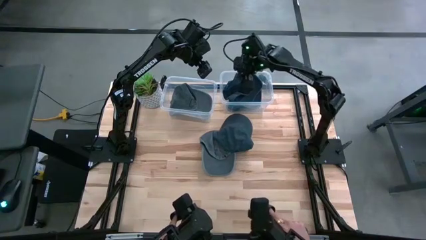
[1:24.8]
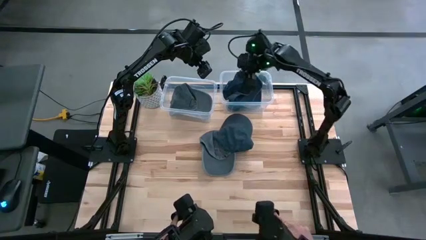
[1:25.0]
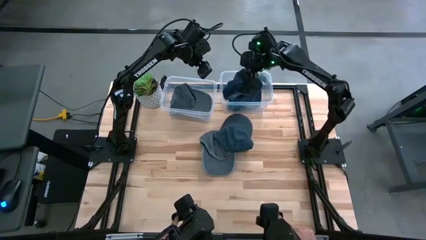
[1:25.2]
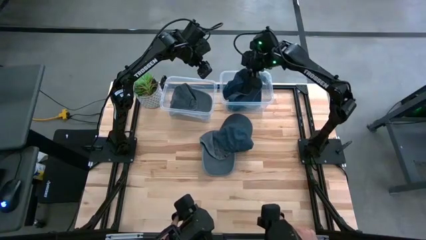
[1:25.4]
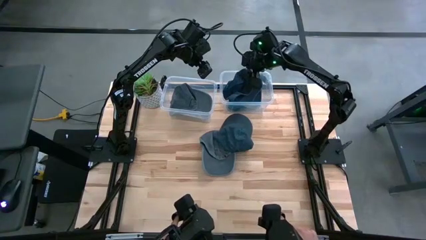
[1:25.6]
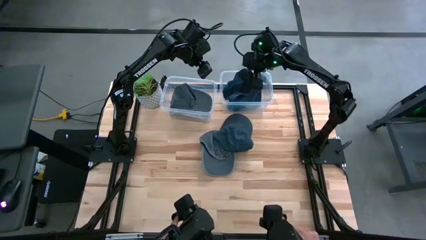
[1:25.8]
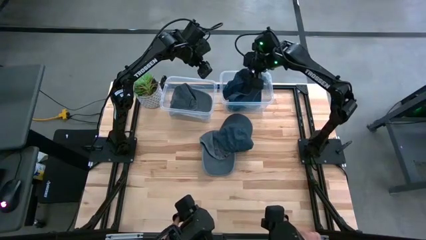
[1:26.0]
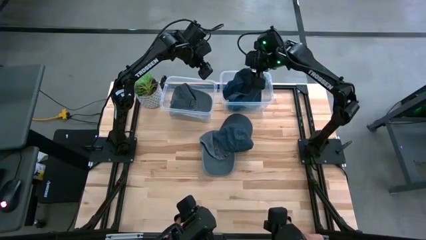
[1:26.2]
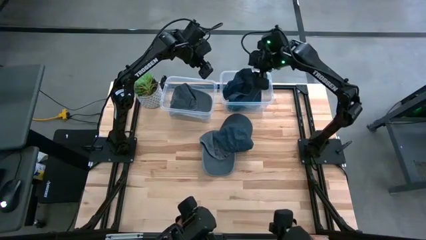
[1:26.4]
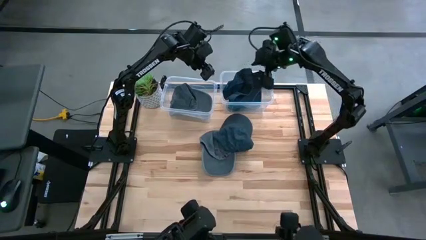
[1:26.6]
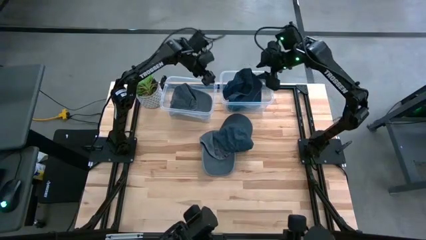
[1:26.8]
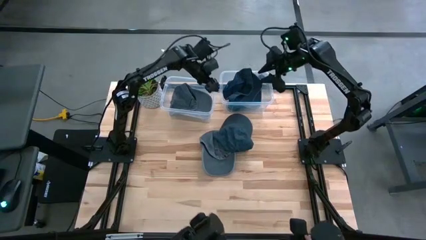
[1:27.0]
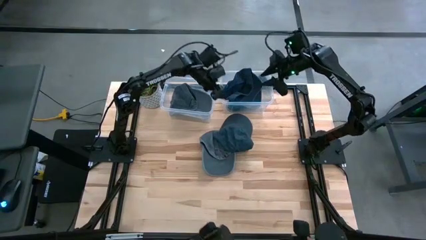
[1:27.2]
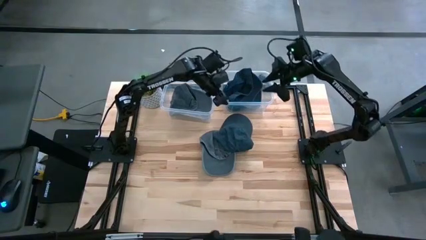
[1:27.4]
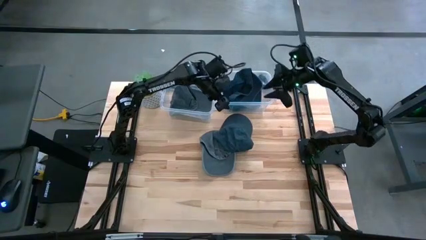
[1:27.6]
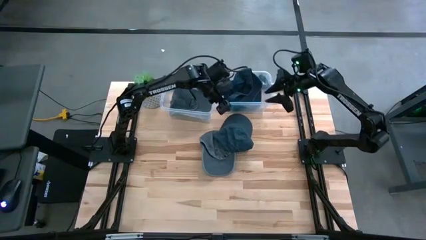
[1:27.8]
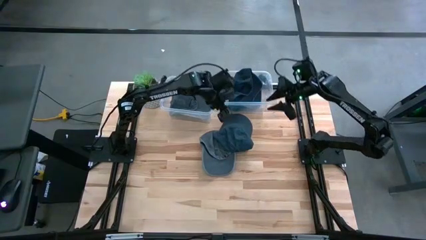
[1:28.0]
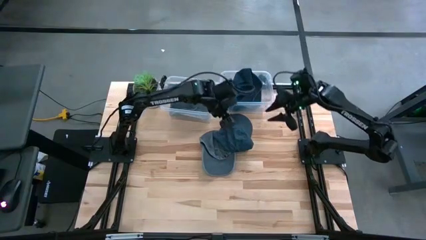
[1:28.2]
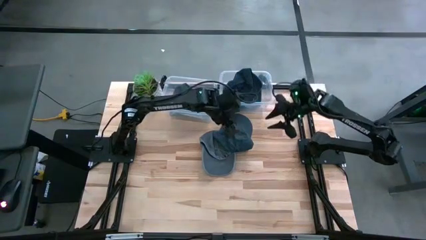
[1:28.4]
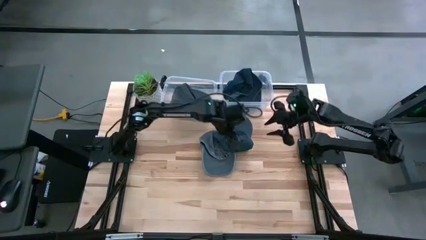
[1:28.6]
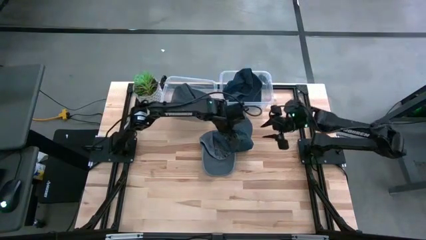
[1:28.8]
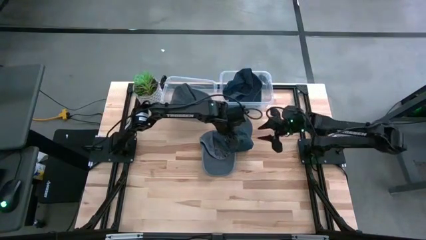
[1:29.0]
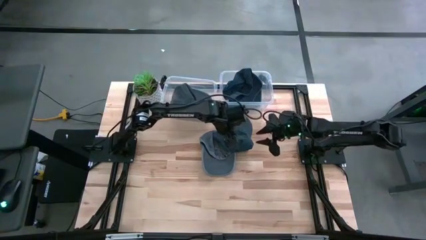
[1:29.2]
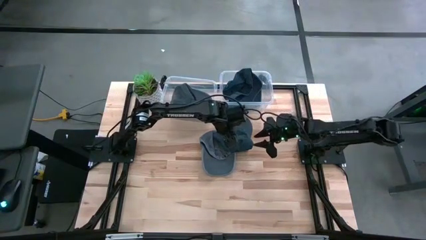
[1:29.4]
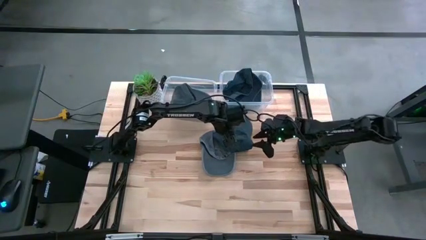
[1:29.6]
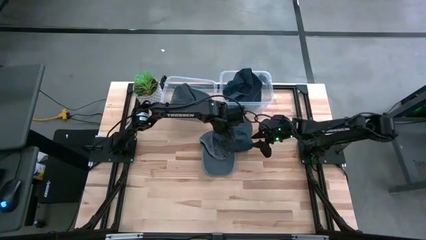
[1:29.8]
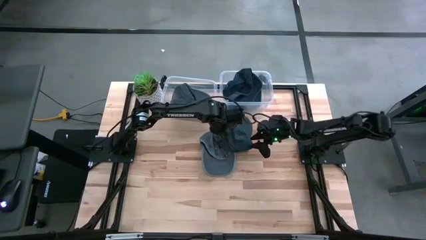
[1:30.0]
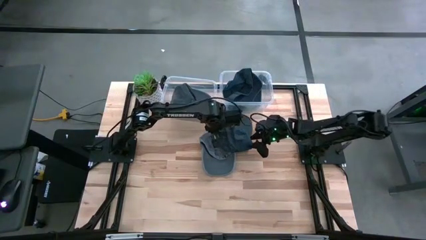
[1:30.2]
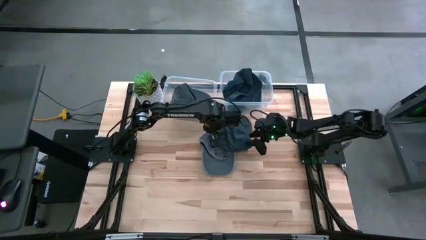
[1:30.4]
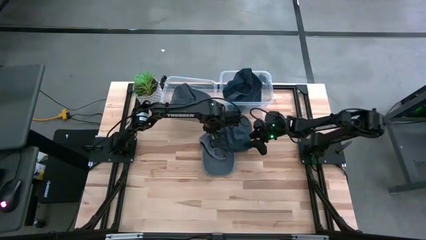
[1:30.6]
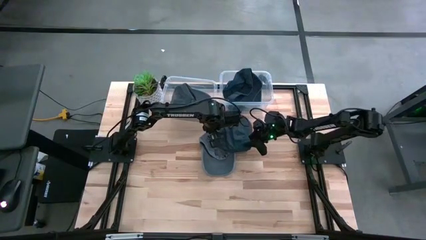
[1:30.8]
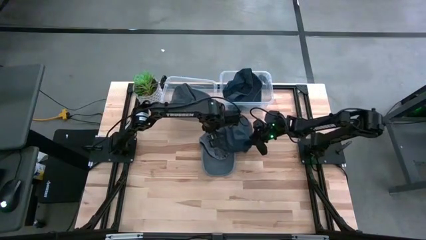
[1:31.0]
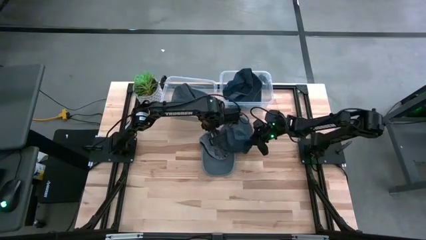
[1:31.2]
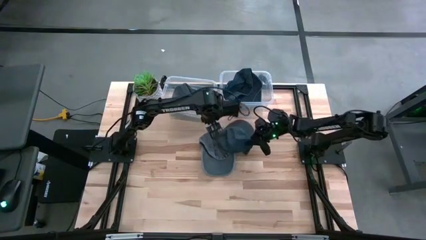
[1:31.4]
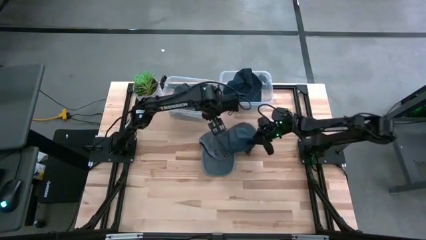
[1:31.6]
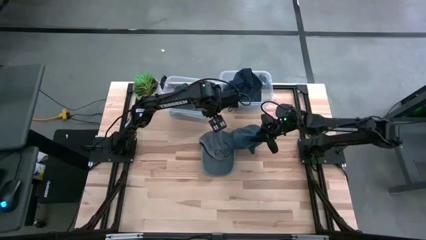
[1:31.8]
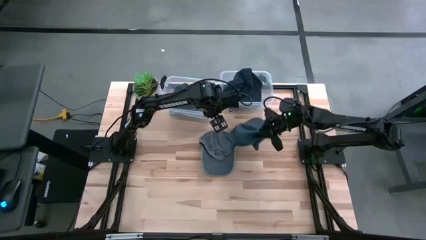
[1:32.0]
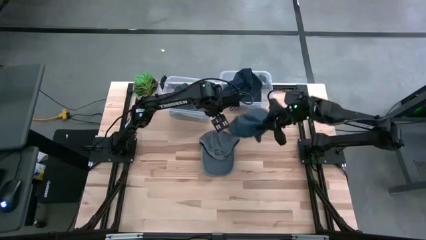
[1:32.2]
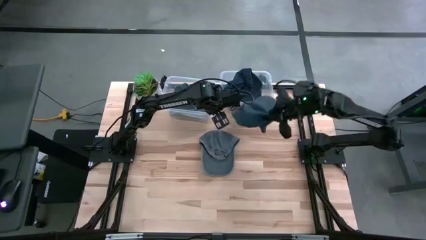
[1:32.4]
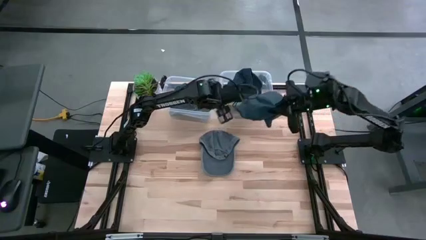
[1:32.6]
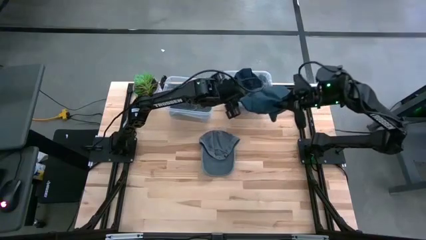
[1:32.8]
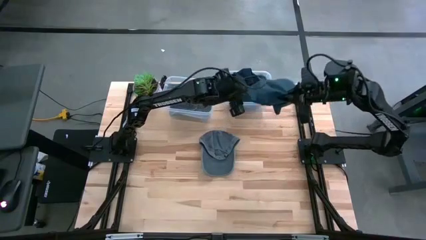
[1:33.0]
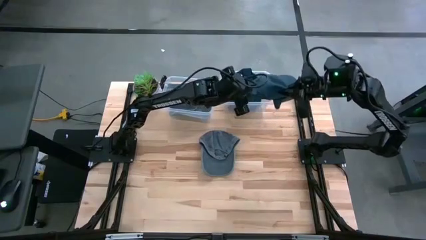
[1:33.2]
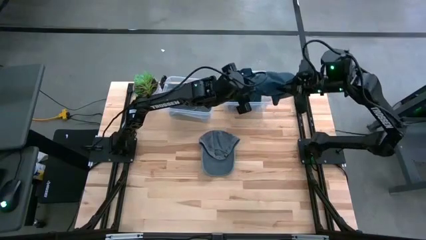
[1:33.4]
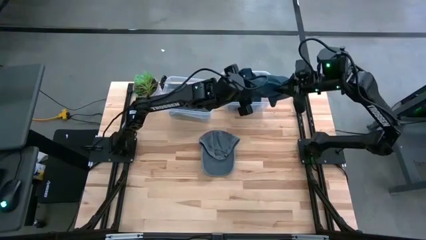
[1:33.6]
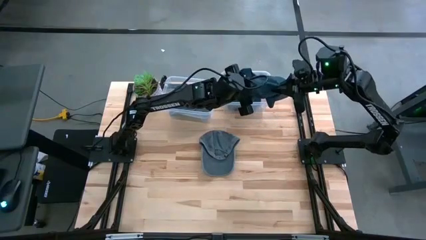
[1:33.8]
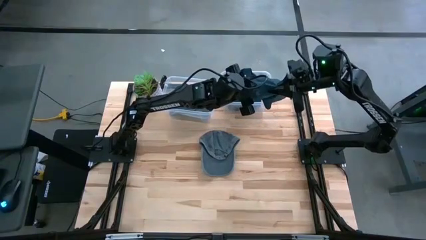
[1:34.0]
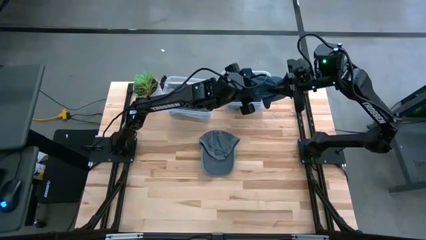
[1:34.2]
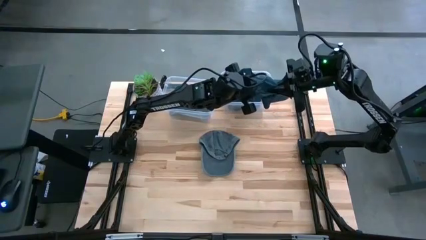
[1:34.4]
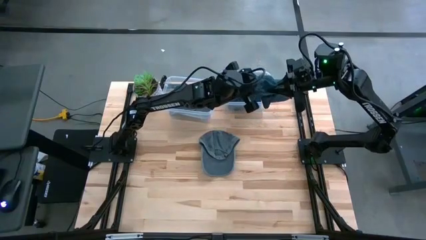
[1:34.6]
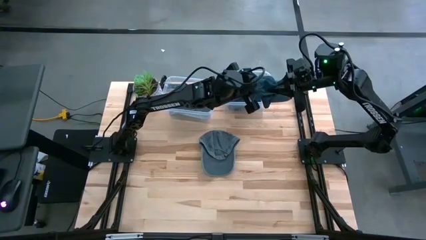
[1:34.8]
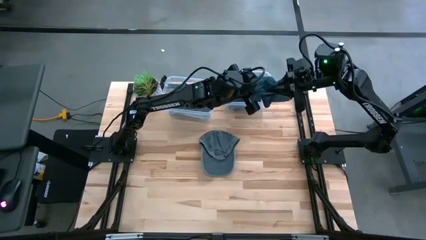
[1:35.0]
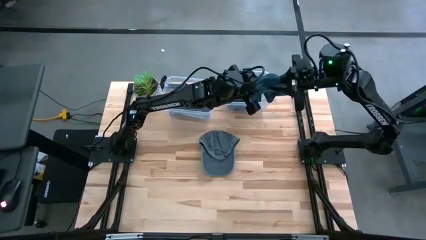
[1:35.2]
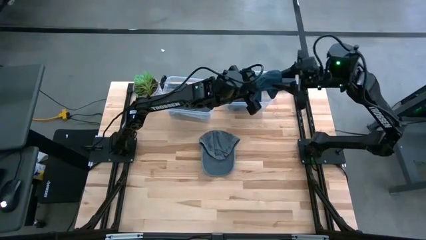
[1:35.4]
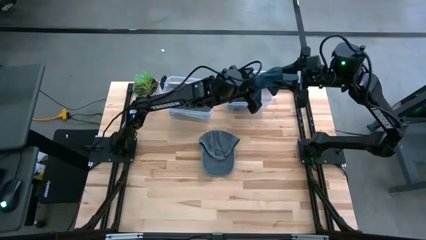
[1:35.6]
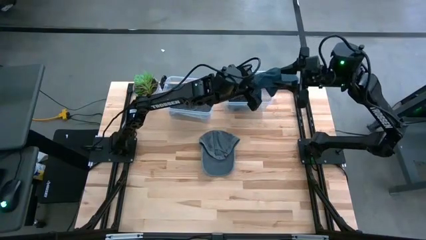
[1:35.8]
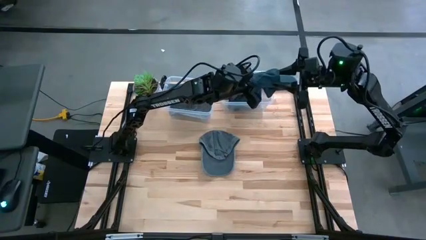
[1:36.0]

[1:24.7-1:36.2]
Task: Pick & Place hat
Put the blue cap into the right transparent bin

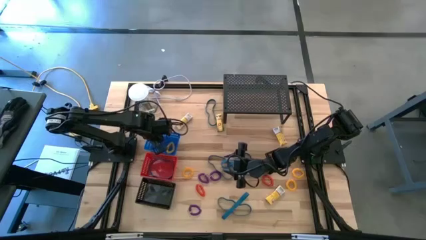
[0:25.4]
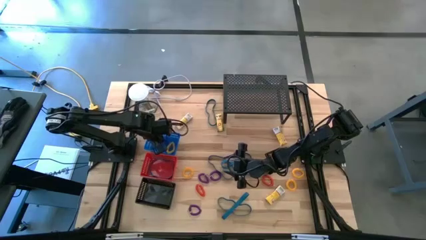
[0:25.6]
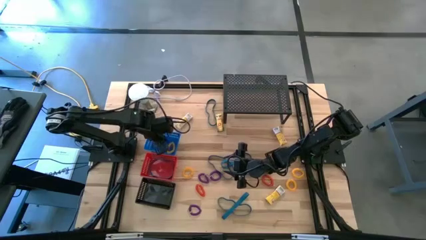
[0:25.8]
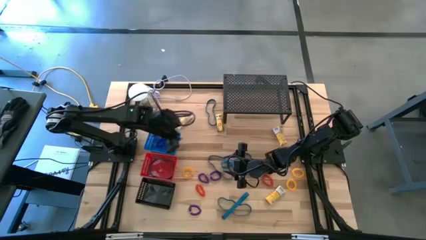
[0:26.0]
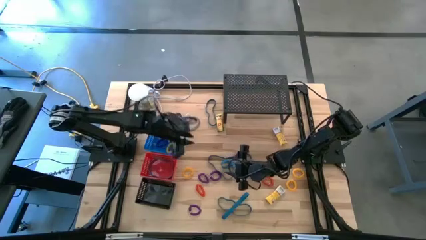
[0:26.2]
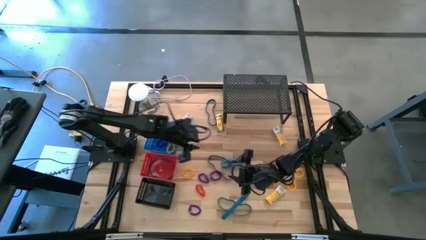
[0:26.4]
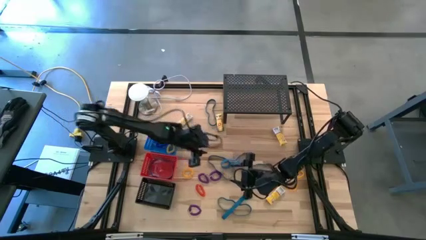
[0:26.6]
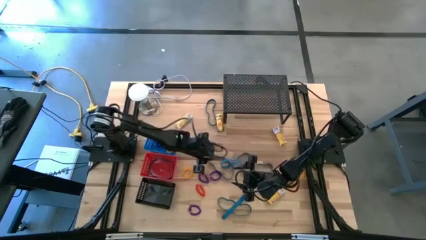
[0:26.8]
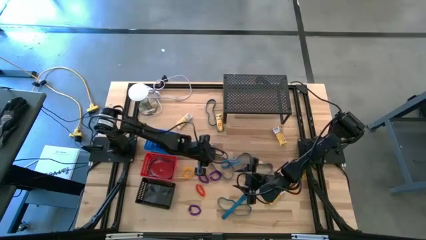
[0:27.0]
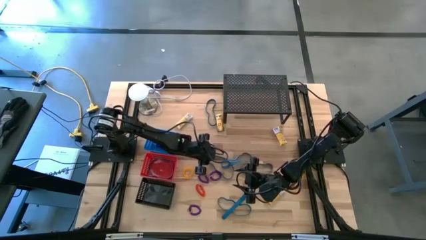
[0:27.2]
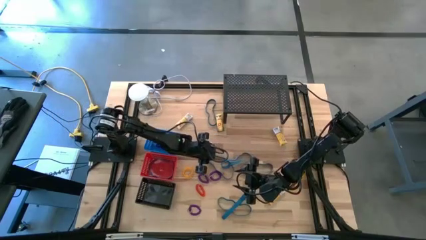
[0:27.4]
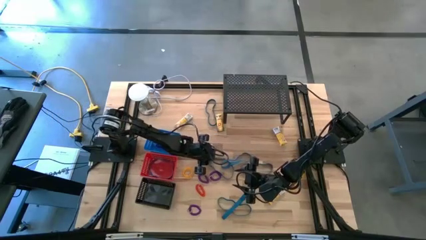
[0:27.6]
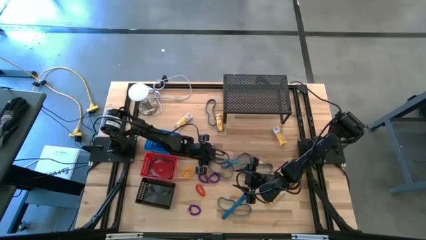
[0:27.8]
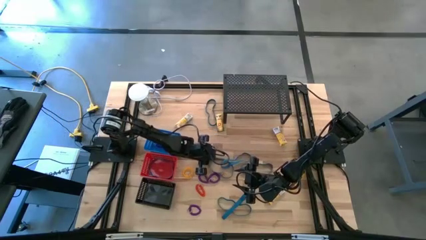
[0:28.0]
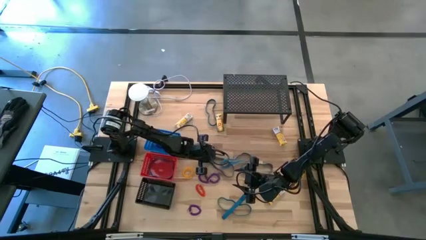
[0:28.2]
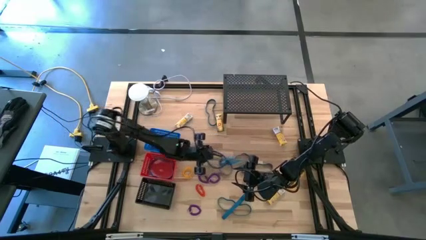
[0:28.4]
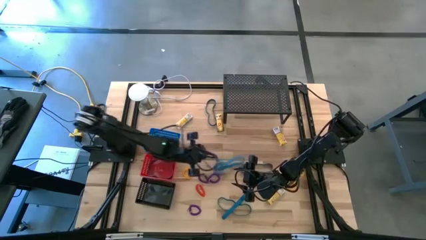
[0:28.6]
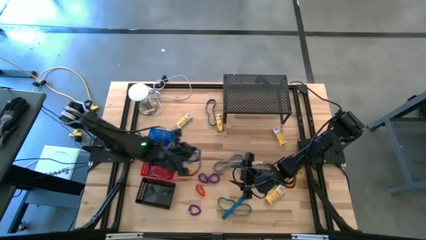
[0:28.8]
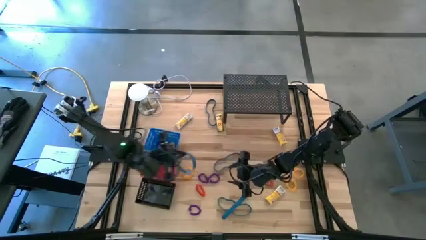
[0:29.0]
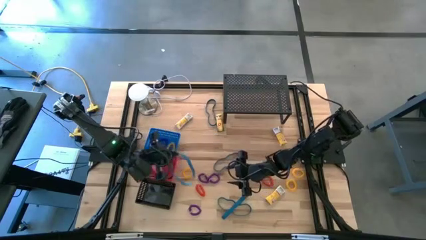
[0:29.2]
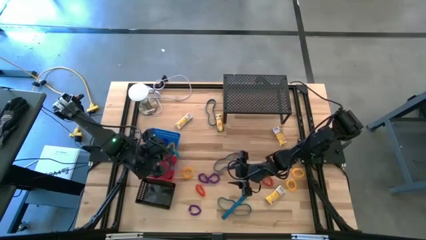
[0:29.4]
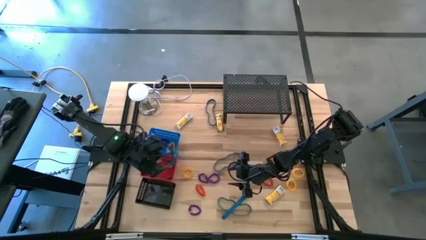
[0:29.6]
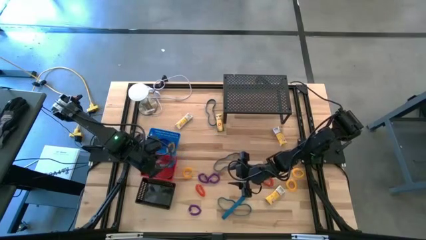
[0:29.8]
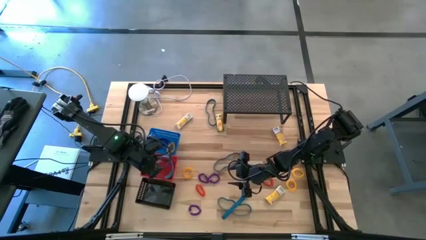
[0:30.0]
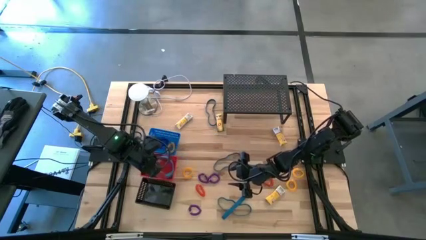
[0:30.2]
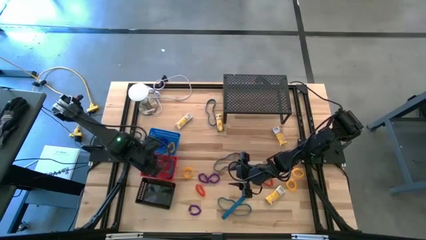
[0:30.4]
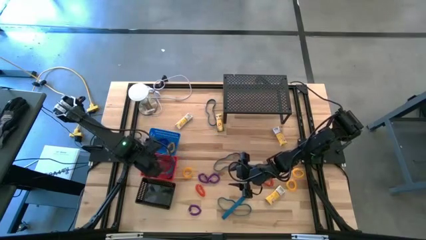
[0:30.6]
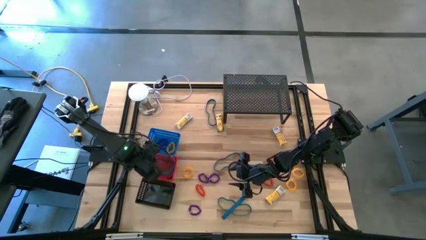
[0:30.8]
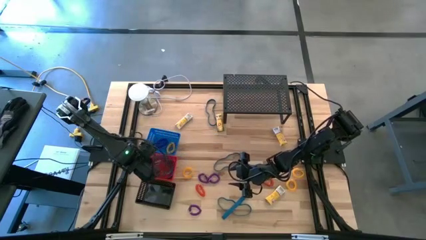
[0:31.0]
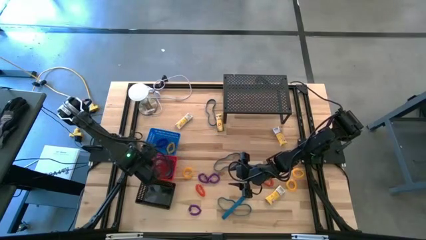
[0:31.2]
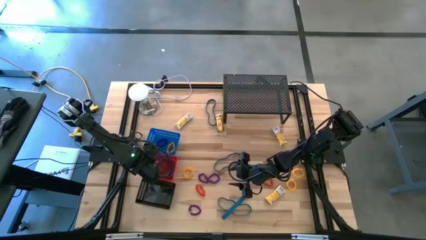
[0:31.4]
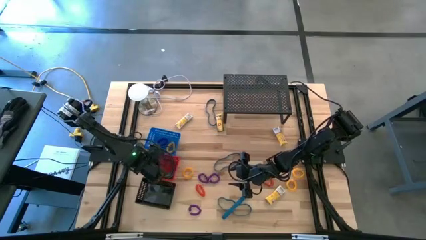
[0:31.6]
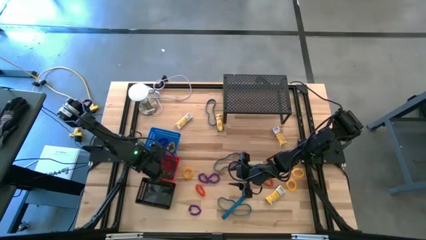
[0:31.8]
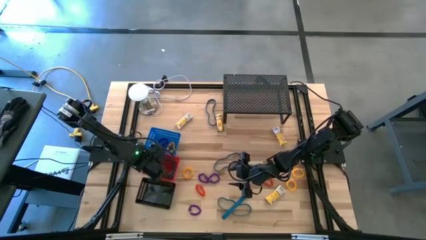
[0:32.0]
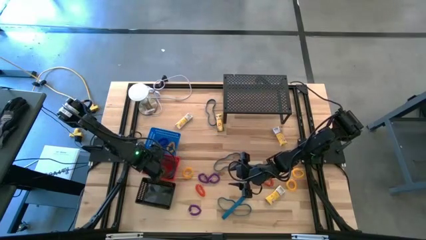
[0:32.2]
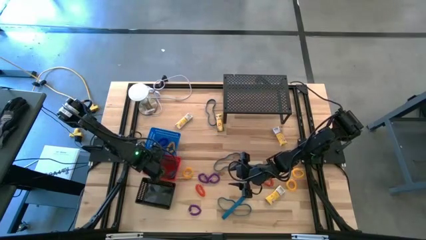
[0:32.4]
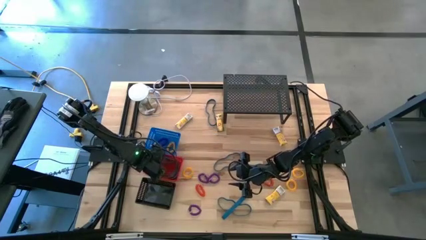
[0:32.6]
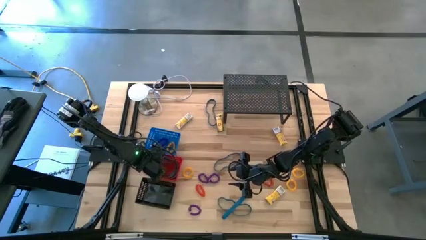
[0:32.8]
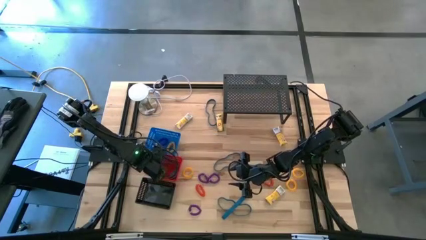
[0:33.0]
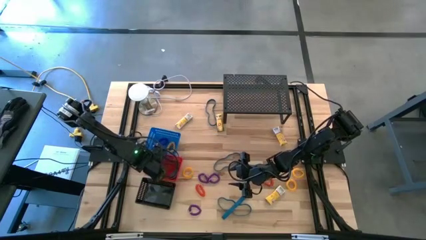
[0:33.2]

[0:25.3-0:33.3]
Task: Pick & Place Office Desk Supplies
Put the blue rubber band into the red bin
